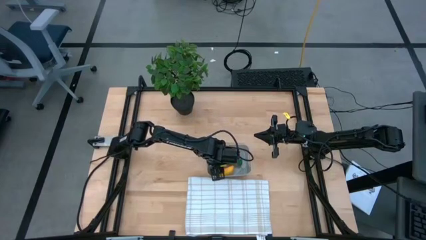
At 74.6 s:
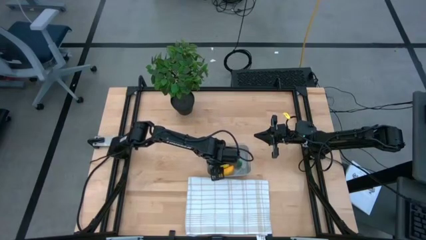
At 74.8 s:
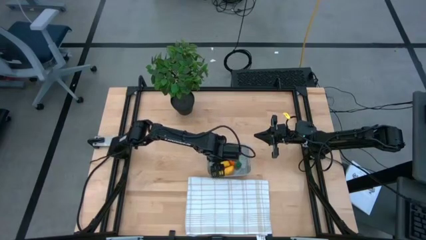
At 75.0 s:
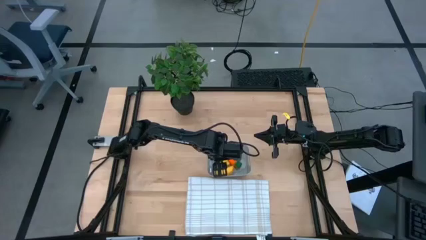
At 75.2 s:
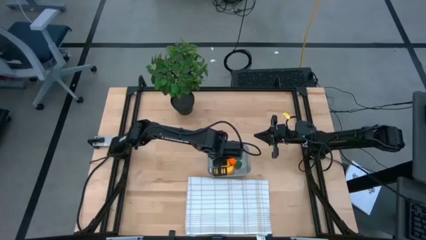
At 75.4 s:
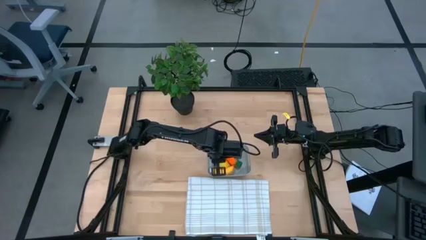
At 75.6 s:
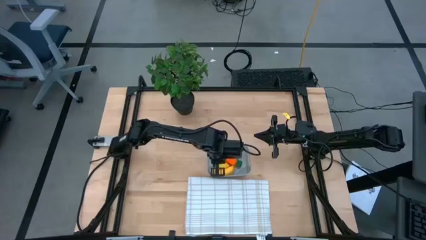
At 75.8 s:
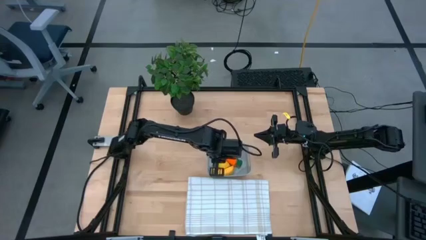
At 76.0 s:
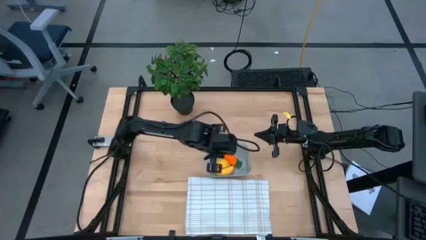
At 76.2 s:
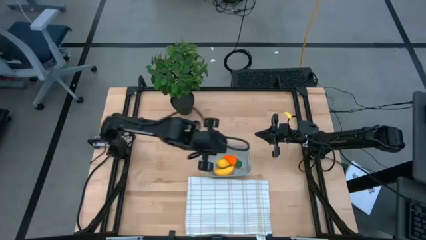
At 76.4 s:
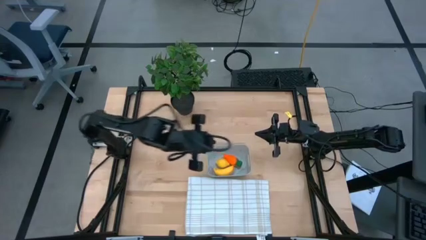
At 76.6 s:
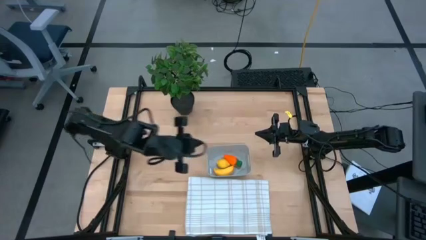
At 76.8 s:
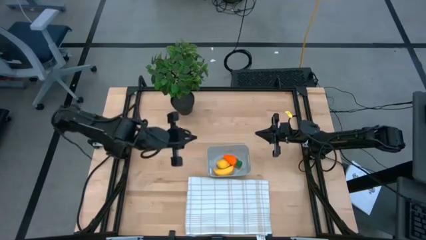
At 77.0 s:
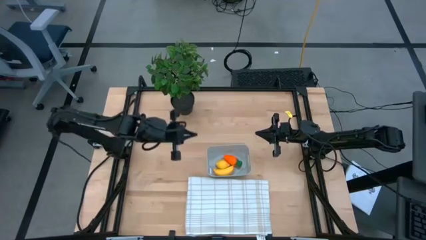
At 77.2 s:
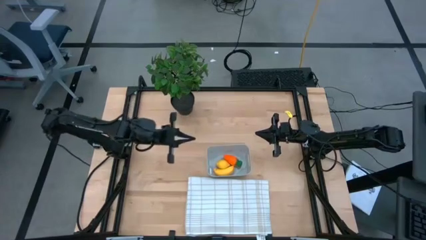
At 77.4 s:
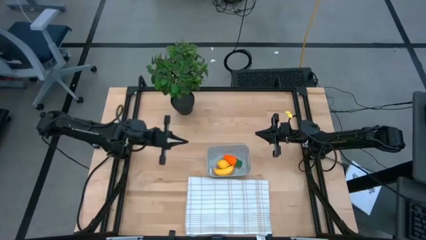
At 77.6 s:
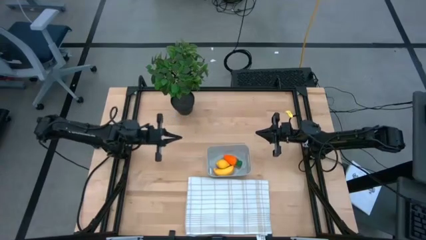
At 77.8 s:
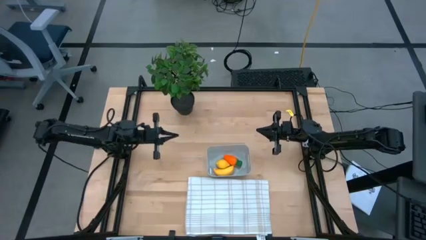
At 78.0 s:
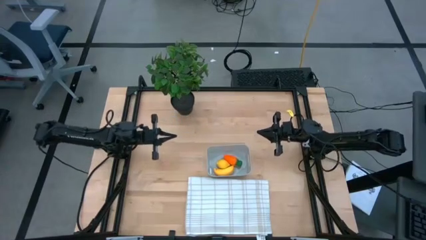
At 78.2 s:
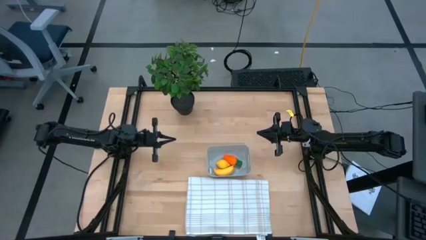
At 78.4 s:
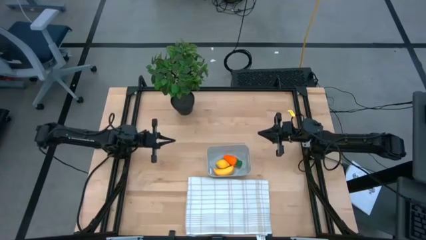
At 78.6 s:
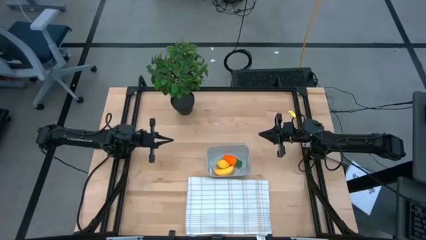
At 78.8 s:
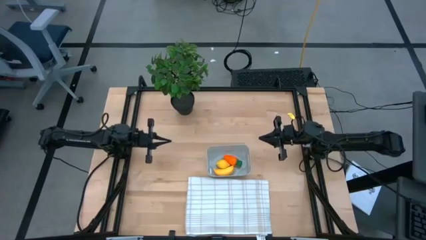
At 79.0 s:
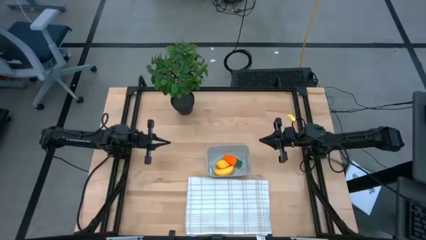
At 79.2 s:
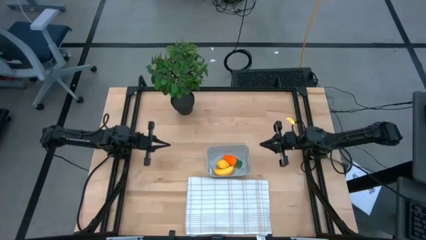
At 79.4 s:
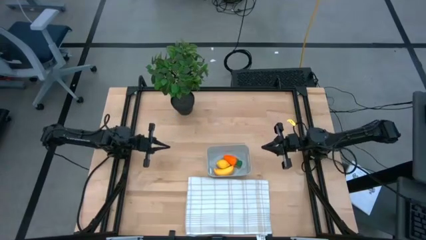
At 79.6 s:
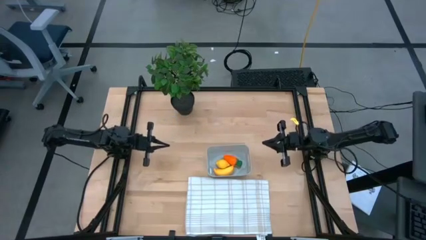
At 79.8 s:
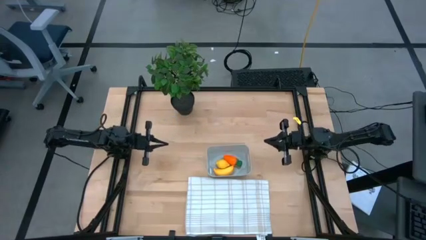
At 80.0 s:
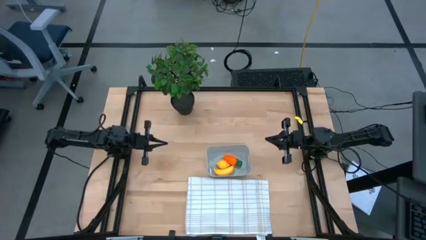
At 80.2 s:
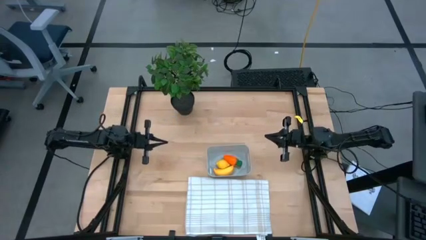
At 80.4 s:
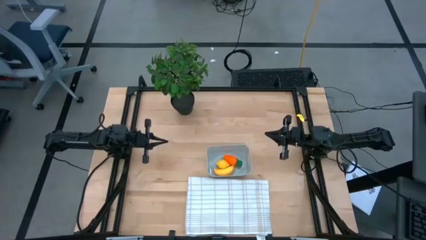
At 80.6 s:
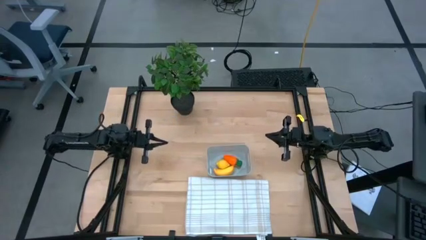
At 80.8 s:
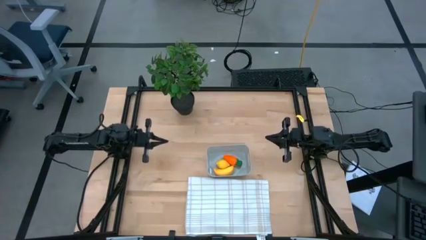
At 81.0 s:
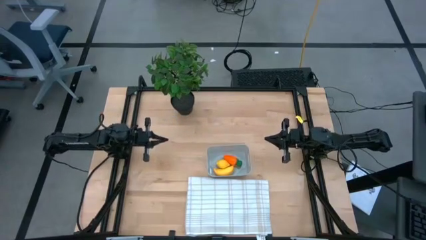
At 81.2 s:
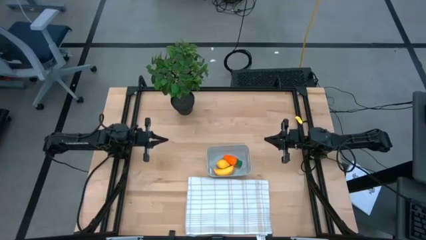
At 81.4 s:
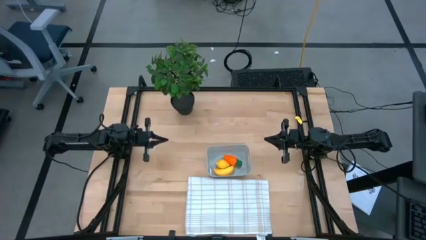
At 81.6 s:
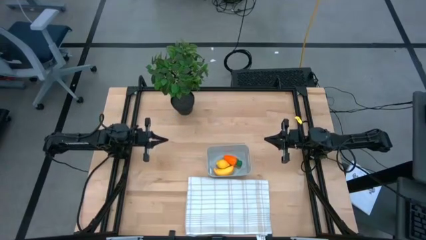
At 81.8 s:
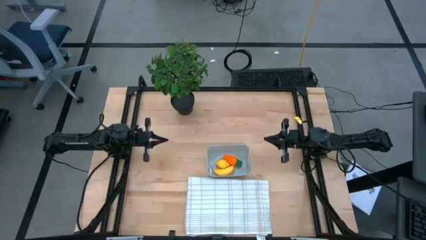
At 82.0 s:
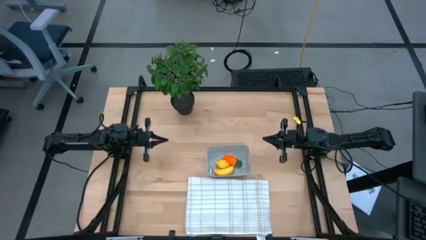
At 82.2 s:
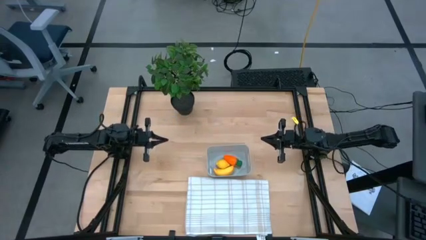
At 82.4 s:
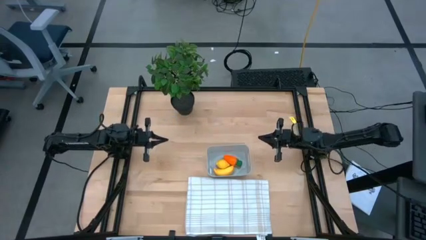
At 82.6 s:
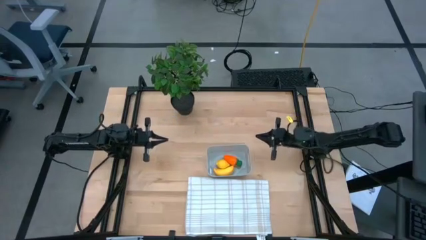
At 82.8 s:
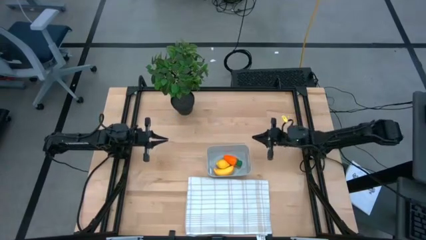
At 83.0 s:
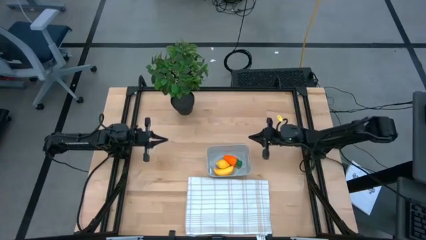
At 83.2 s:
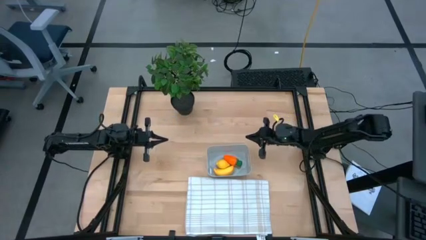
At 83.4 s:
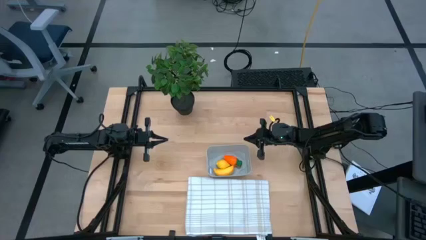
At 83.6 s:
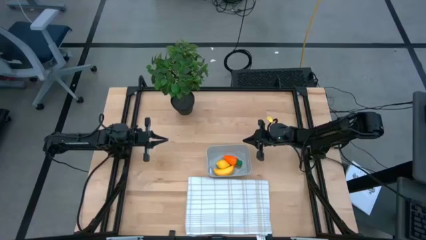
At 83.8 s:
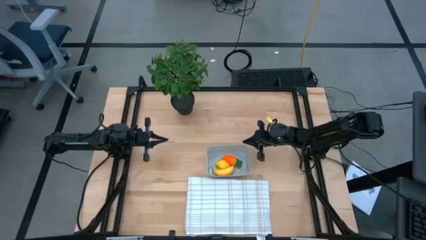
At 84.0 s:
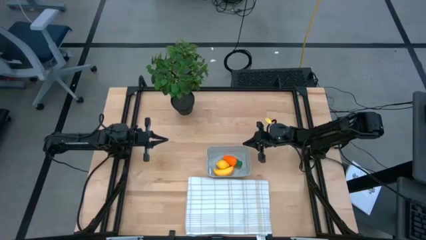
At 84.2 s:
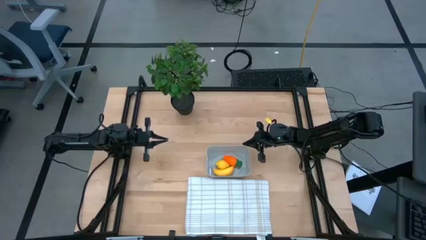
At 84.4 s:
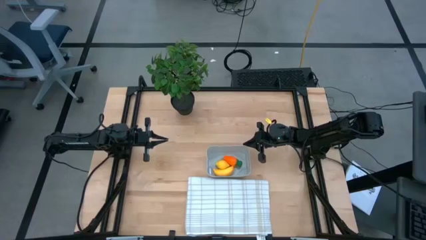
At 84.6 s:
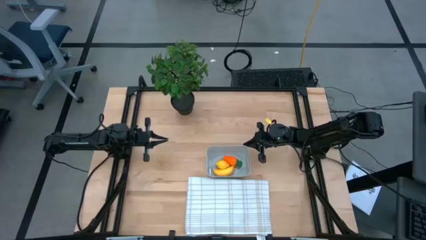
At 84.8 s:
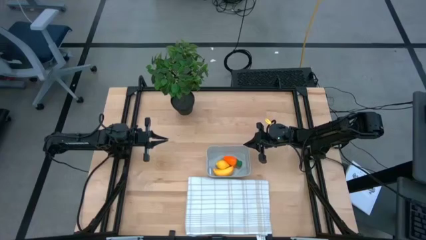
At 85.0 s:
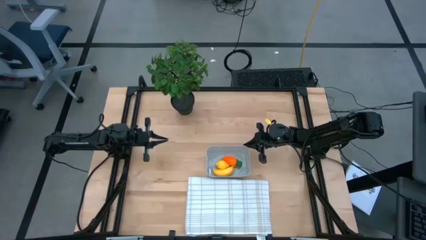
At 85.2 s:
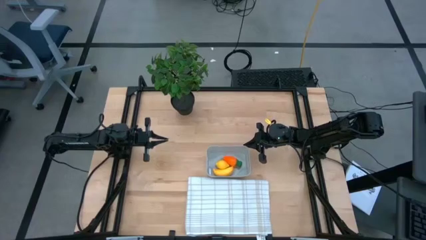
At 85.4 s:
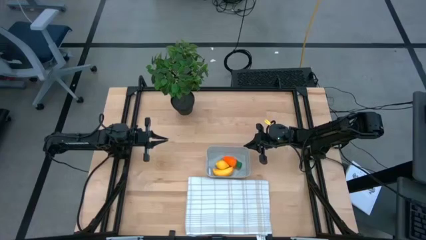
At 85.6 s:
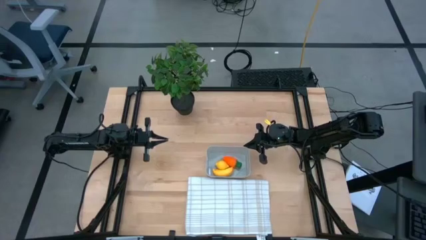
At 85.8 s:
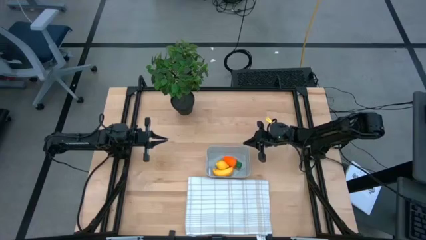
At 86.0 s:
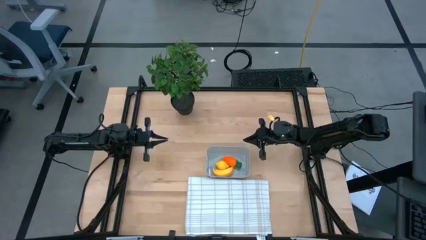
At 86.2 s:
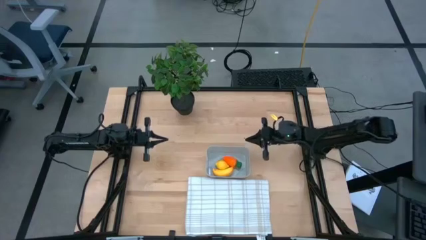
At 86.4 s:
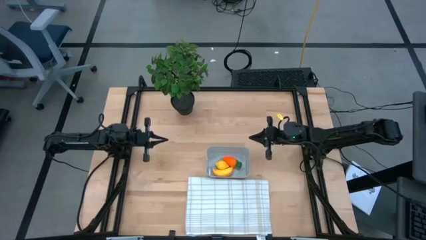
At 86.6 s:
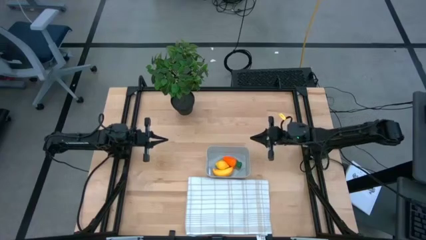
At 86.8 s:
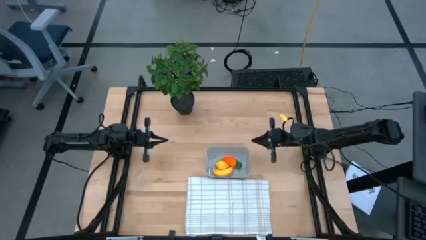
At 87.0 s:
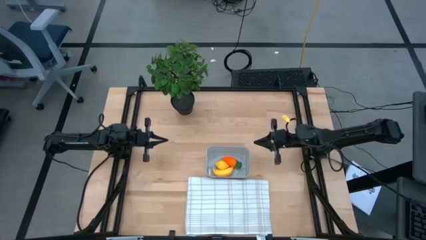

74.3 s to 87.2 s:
Task: Pick and placing Produce into tupperware
Return to Home Position
